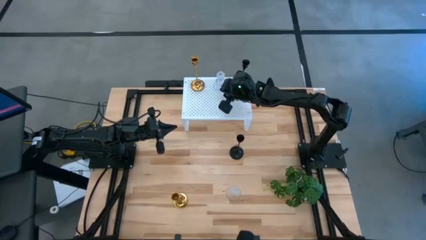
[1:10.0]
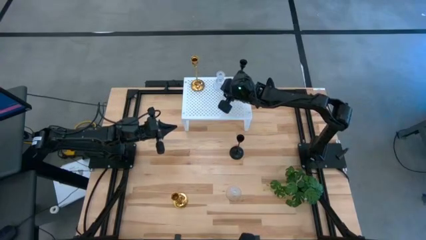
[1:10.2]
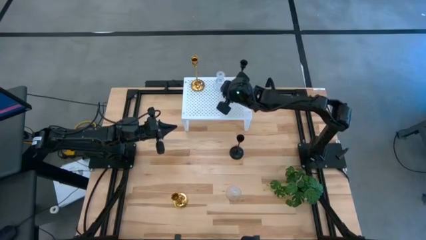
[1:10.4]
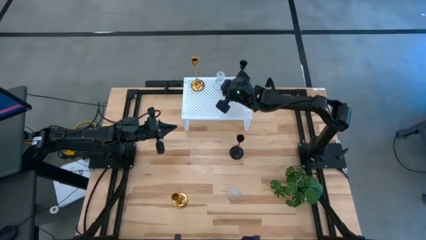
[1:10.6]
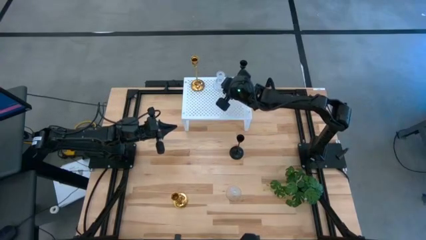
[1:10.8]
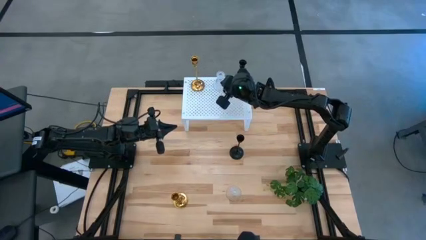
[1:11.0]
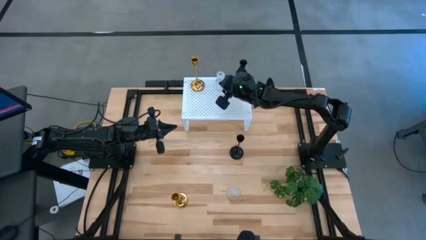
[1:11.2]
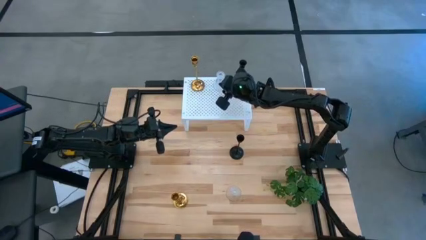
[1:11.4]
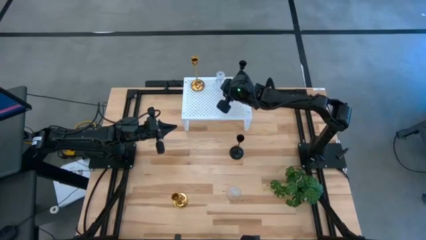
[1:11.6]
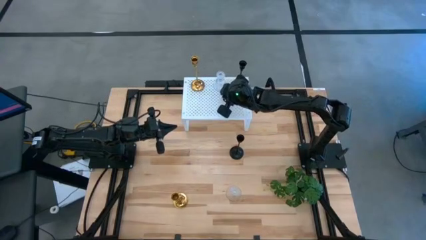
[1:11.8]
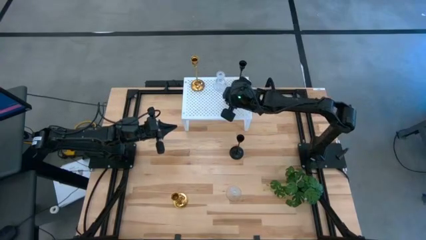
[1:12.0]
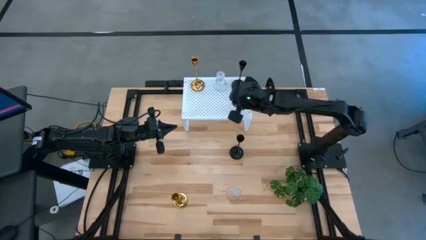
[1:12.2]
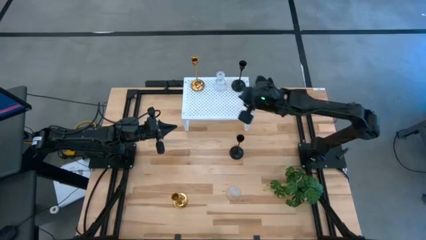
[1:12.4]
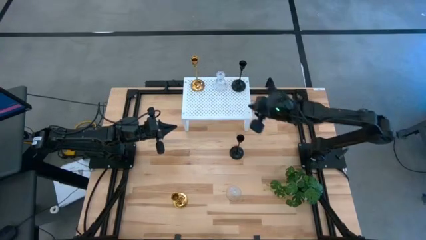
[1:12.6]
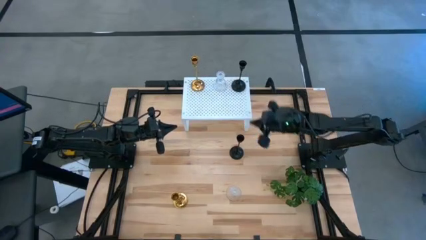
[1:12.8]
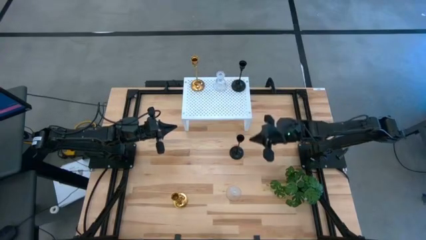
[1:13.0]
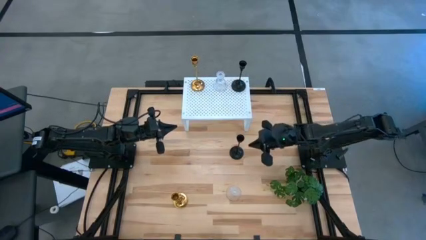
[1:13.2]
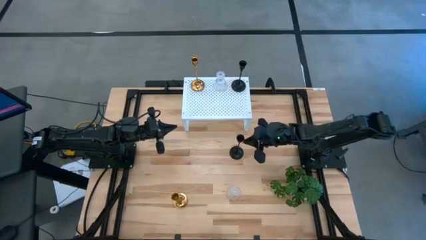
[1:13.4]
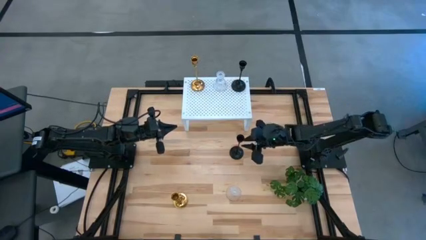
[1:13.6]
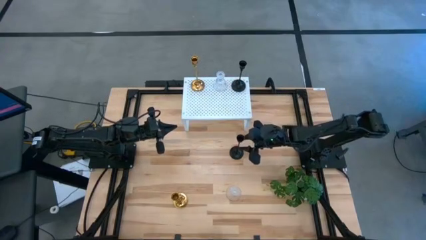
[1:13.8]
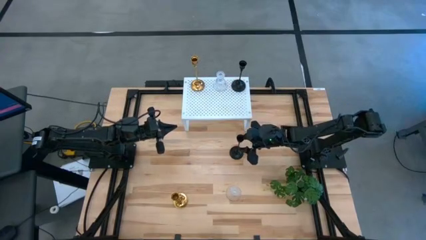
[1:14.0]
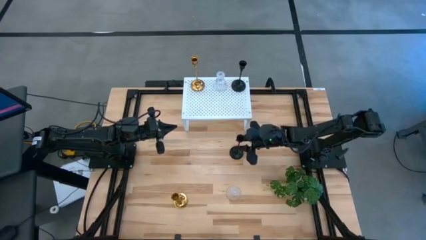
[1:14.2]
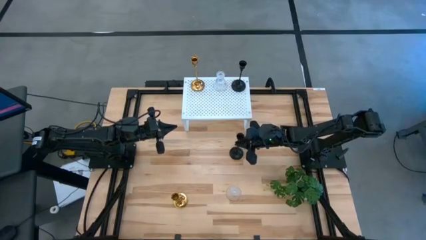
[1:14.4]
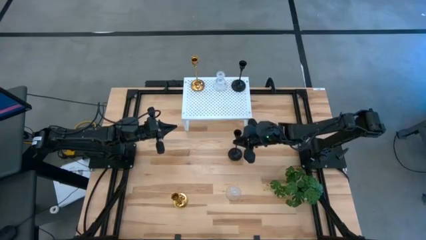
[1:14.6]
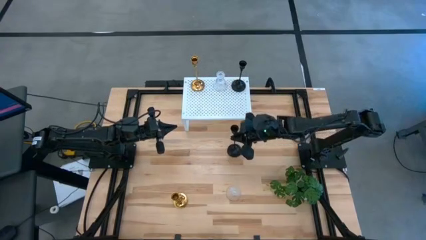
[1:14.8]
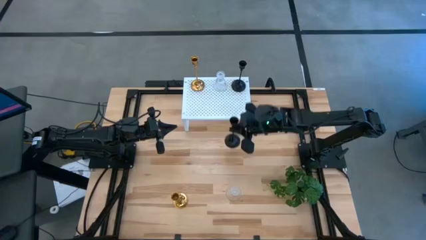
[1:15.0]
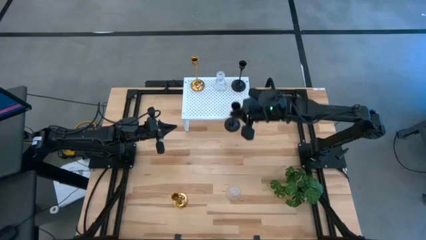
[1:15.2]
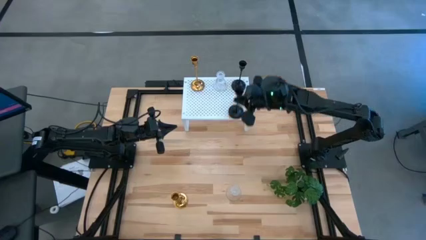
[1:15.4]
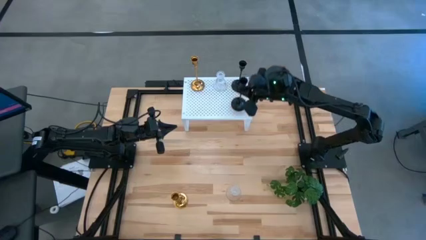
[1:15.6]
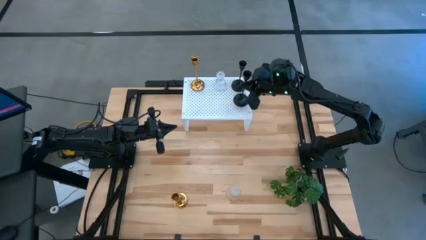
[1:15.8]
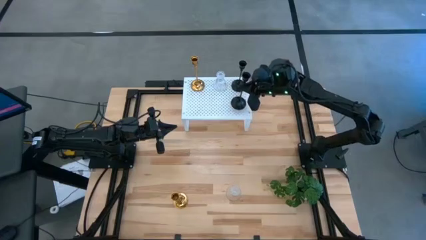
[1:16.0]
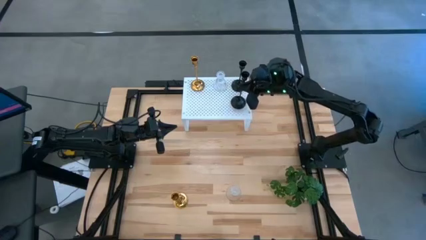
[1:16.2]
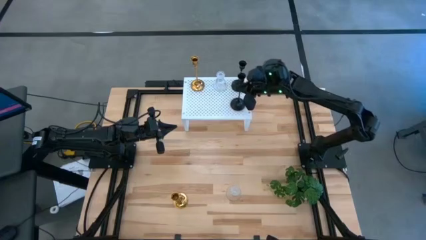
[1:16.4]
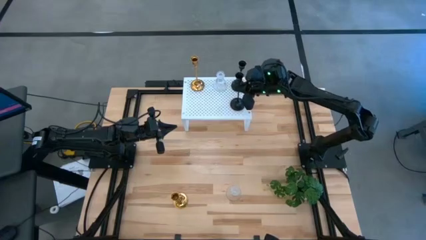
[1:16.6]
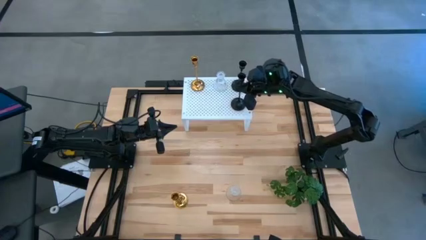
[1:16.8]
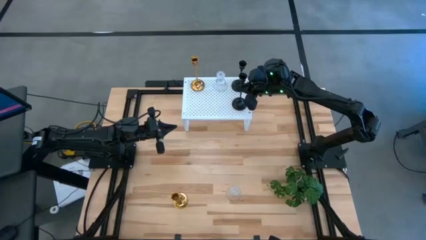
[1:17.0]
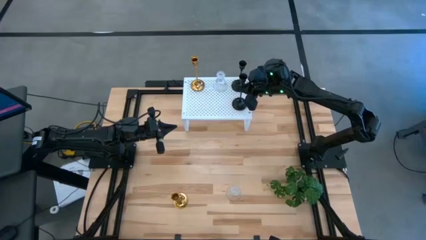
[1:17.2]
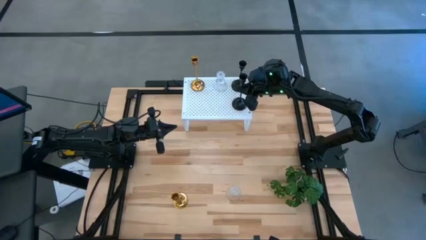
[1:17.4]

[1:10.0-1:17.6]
Task: Pick & Place candle stick holders
Put the black candle holder on the shelf aligned with the other black candle holder

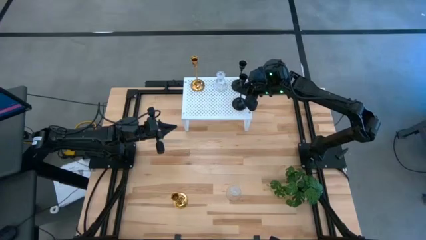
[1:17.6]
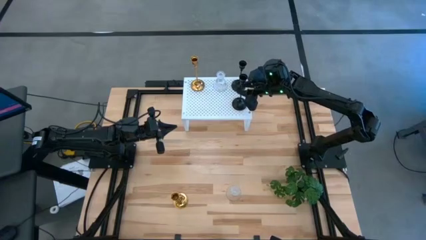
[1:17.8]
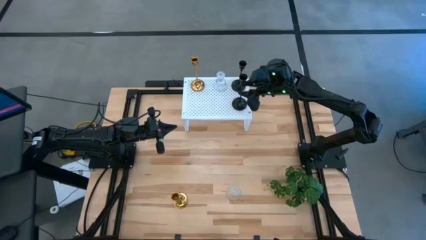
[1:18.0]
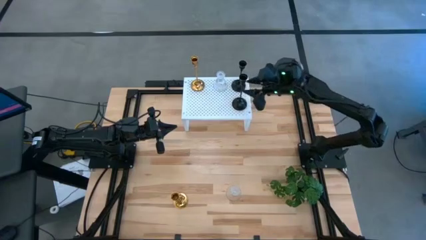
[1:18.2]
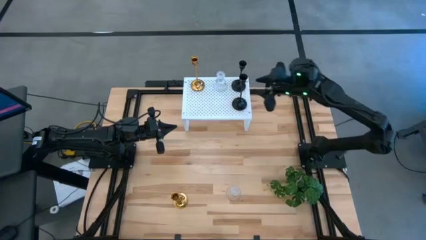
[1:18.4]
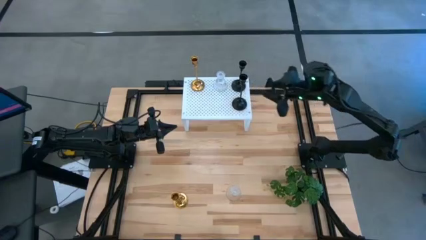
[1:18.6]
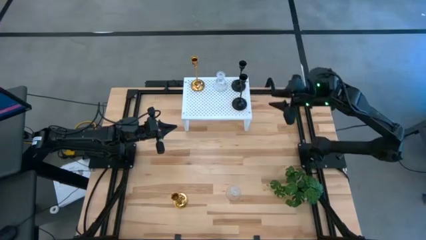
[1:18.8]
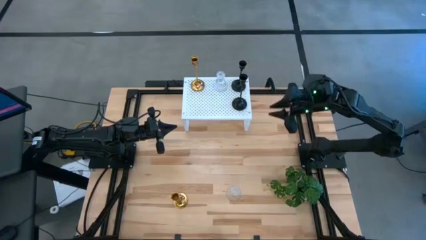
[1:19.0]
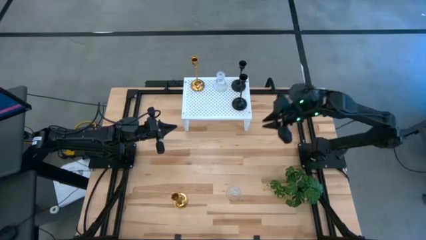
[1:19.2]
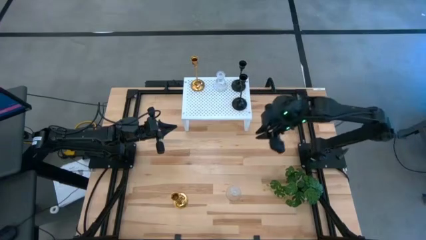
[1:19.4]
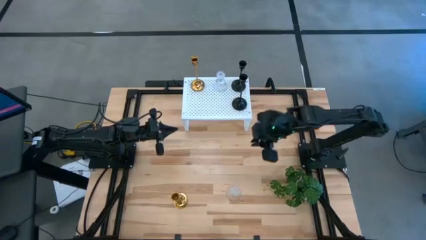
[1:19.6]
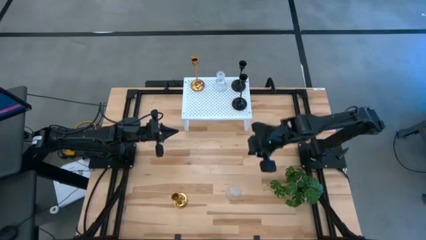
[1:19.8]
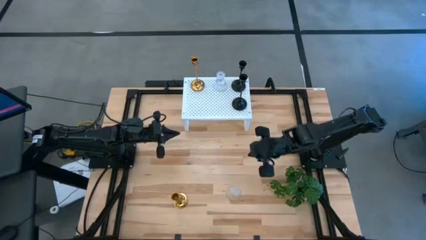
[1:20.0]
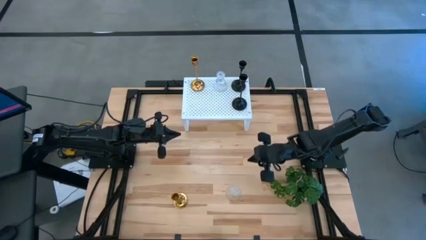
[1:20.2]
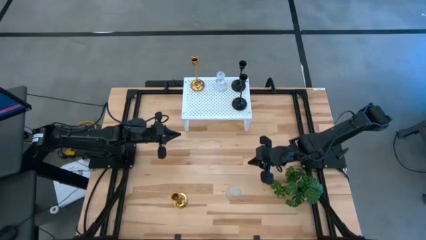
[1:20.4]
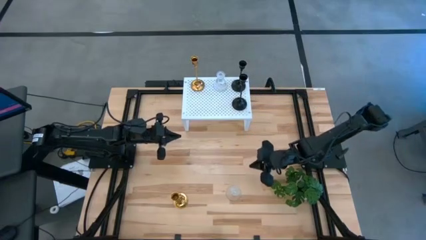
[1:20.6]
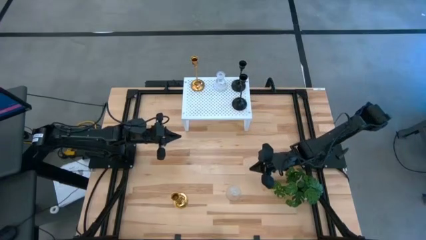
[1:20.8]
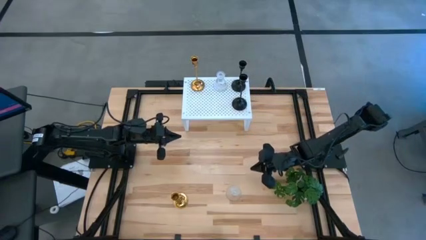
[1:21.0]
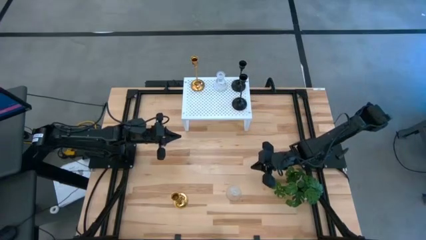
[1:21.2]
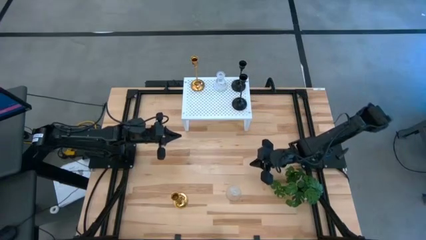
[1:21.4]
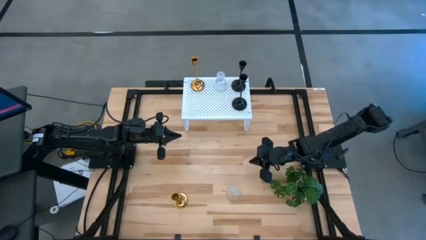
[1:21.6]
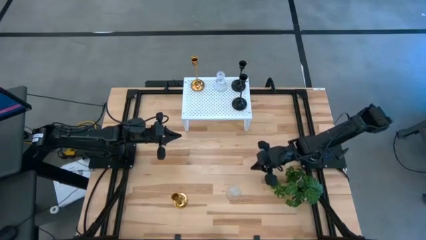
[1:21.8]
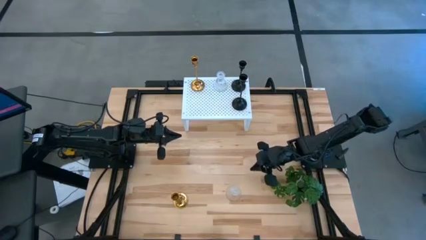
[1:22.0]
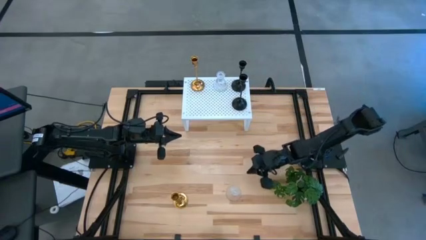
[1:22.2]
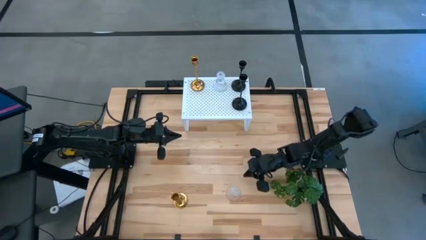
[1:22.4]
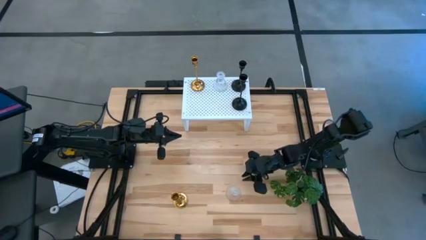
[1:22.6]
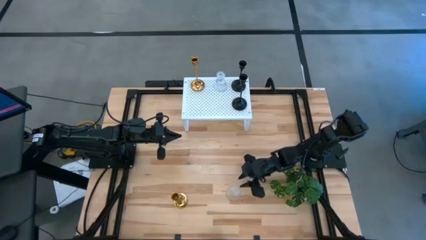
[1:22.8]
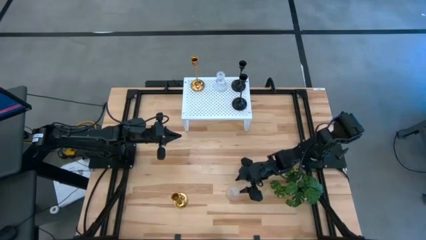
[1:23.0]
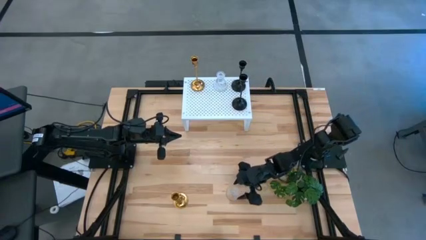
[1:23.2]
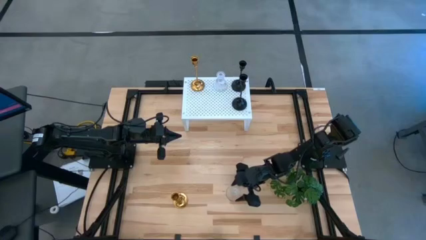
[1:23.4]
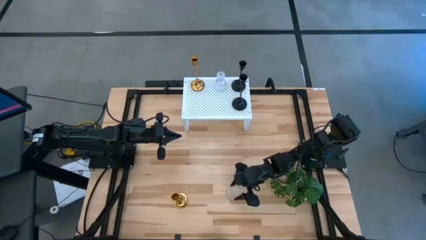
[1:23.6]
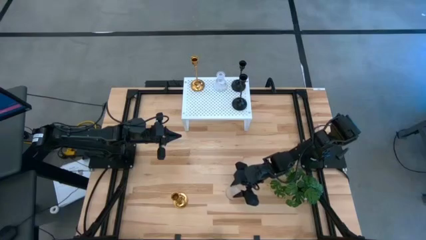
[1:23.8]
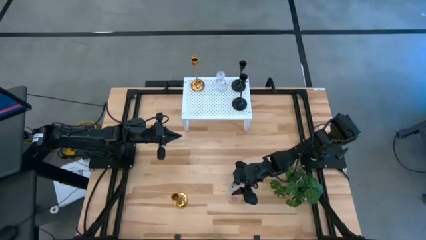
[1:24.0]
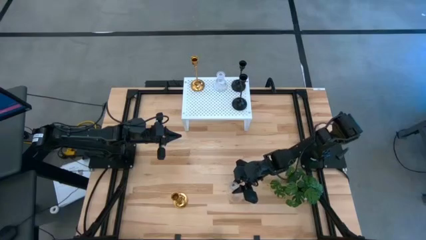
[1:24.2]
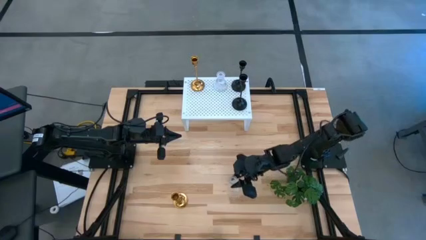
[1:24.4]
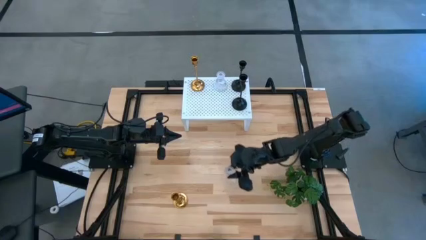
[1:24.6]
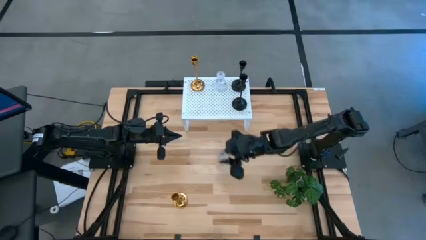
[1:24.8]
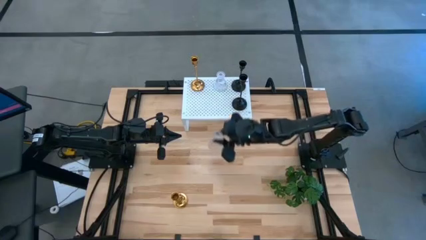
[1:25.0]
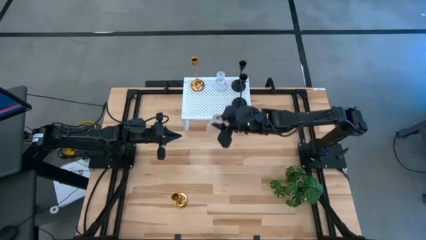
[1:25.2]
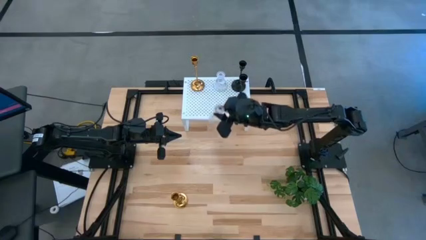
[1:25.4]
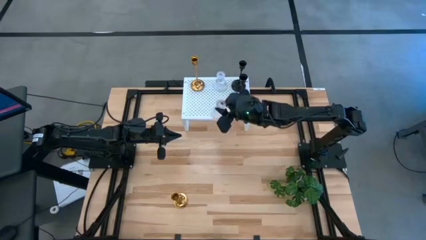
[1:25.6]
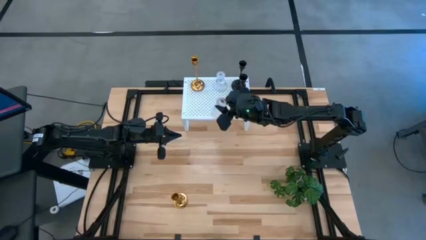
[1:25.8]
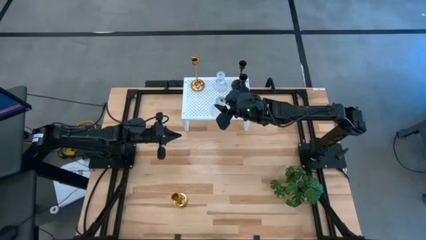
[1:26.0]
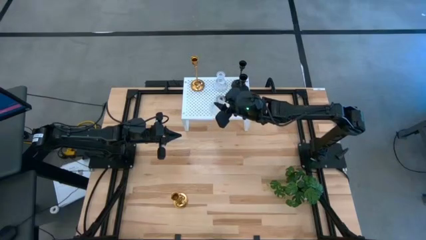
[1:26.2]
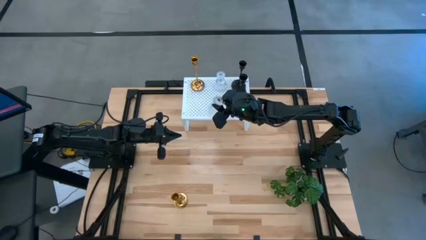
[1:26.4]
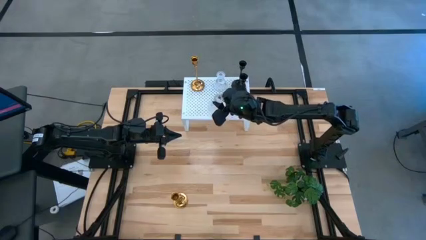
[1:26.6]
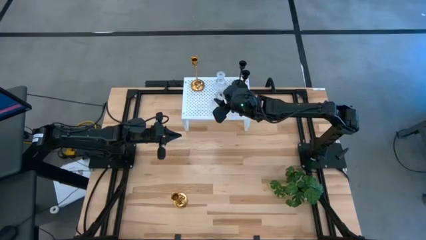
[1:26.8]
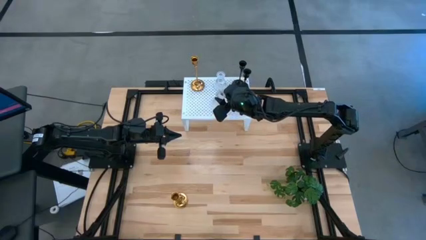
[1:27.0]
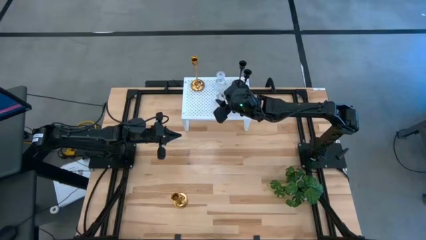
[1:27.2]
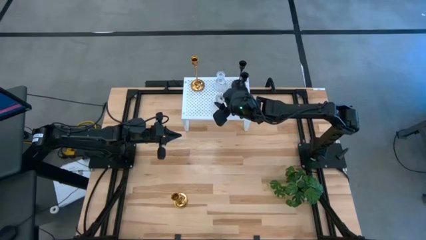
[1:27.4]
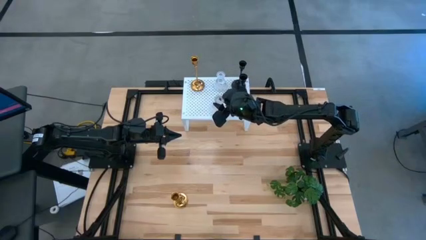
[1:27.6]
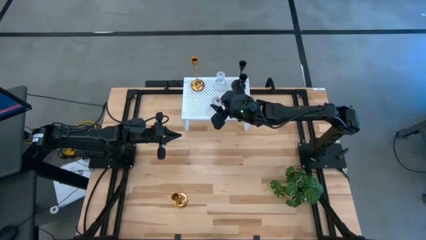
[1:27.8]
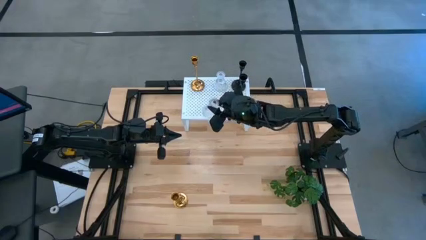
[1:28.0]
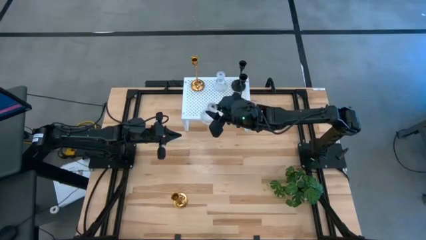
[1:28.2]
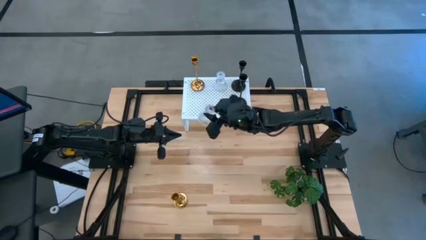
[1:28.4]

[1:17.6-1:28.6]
Put the transparent candle holder on the shelf aligned with the other transparent candle holder
